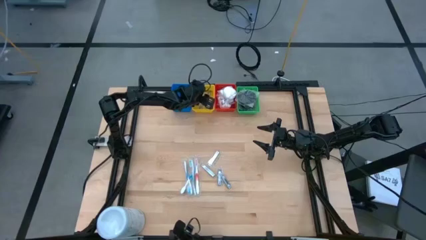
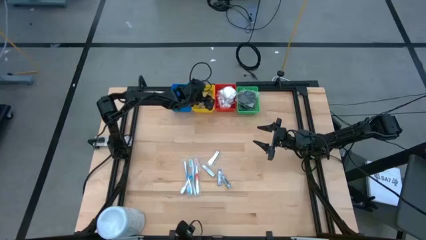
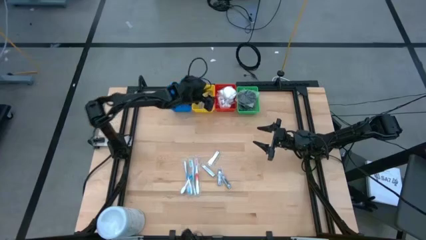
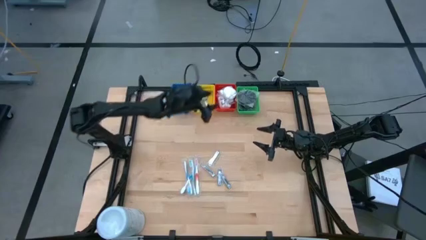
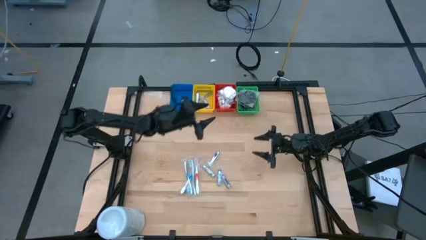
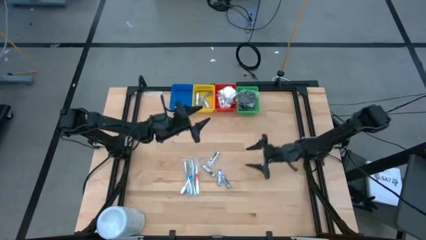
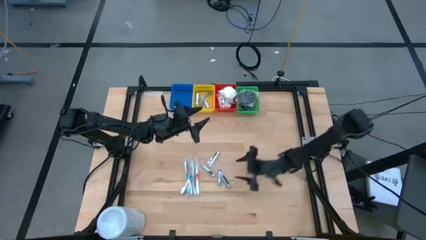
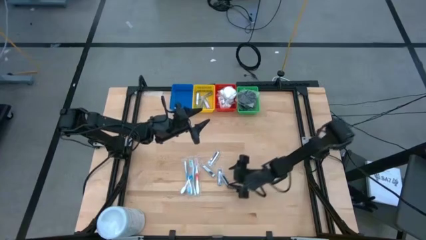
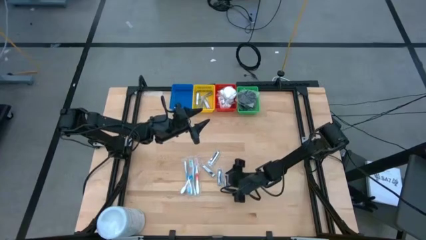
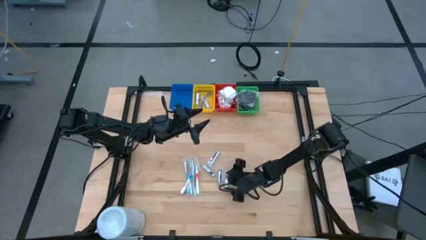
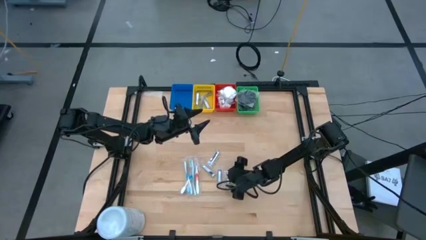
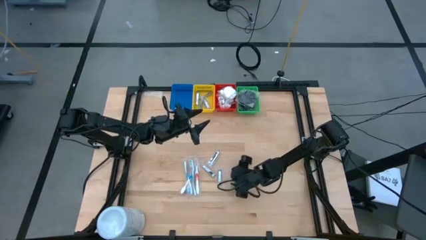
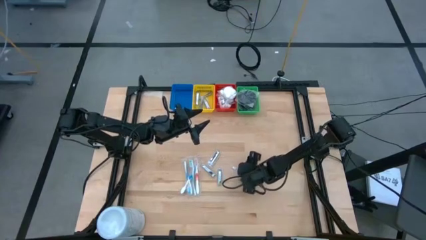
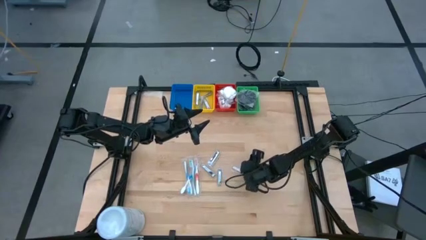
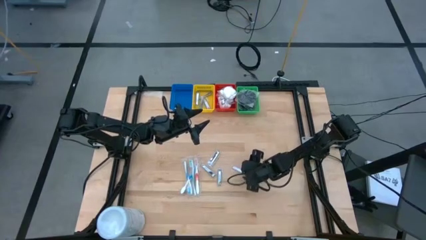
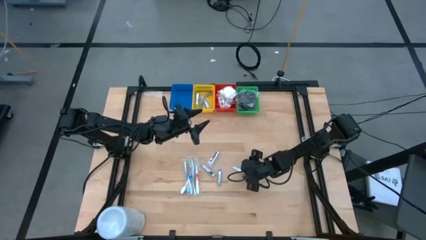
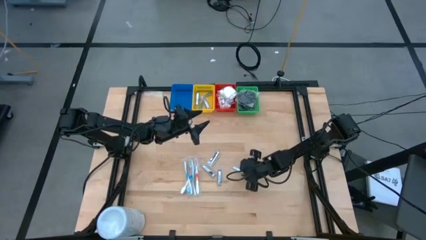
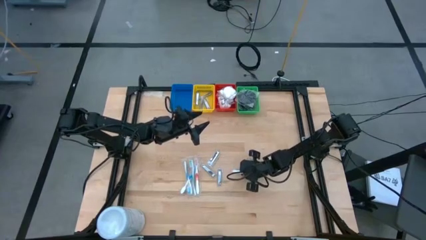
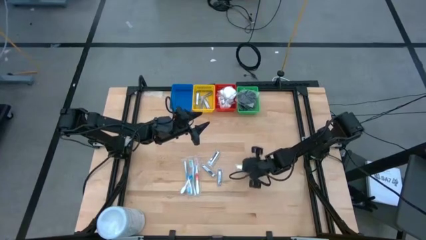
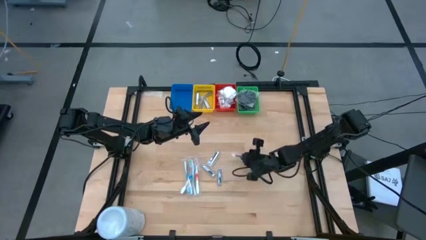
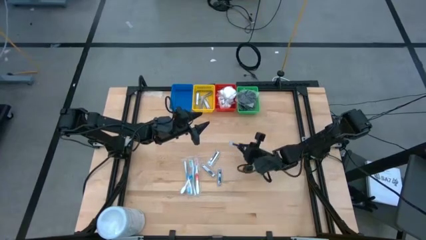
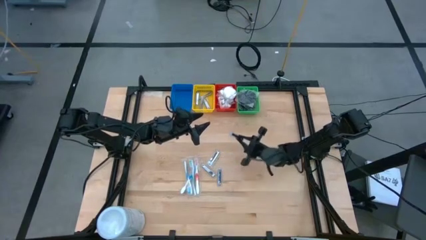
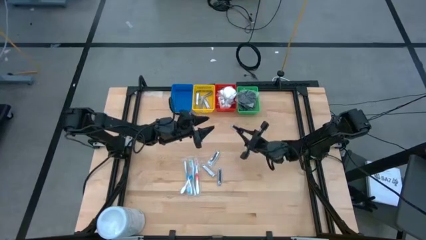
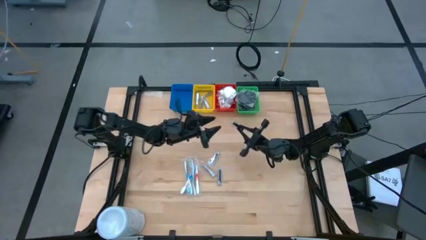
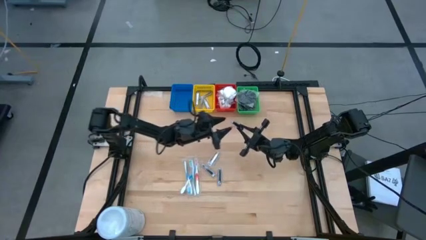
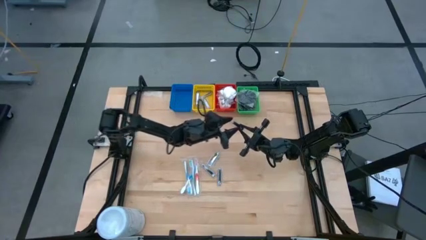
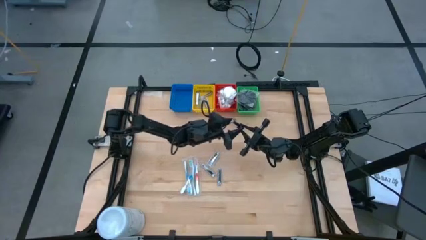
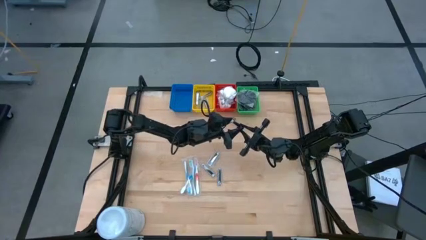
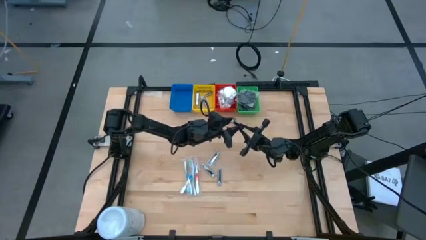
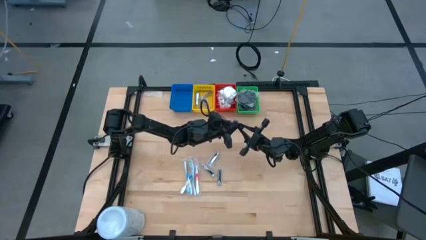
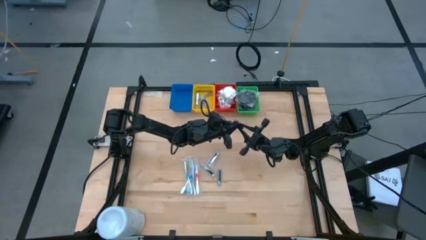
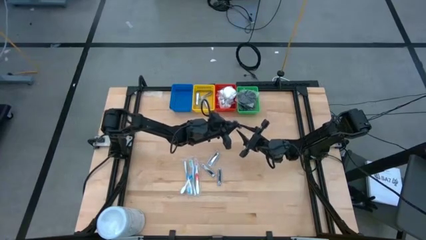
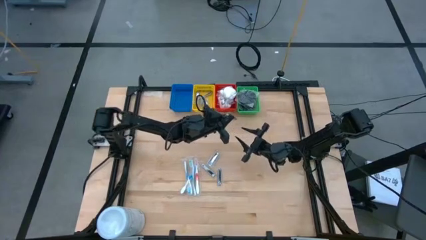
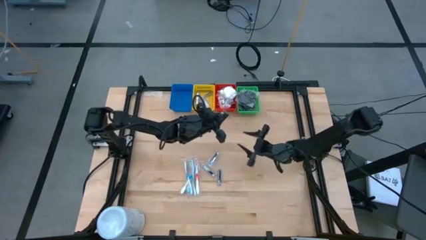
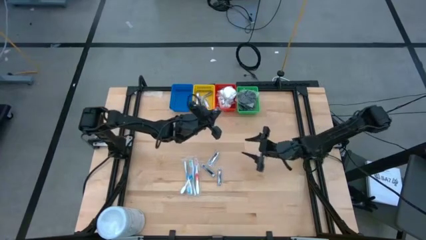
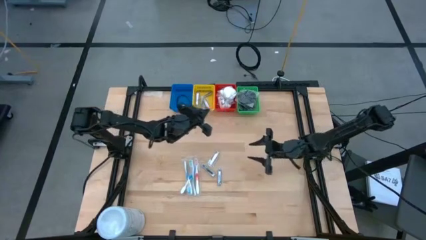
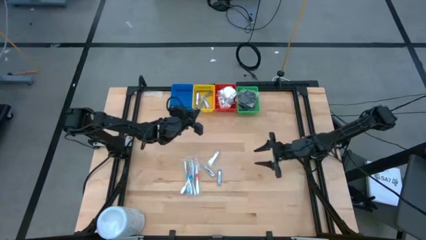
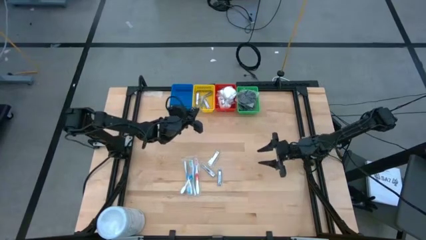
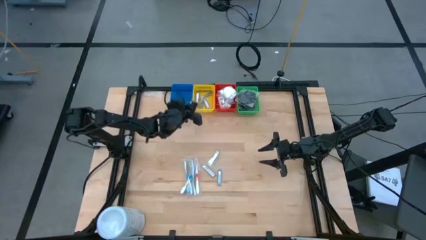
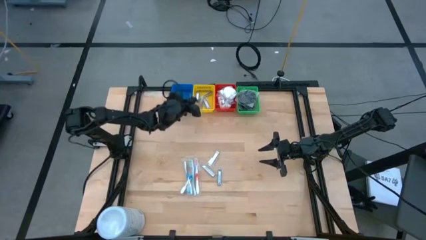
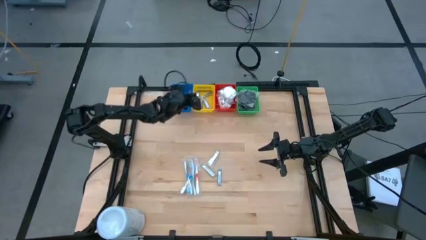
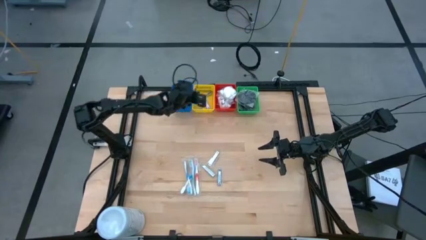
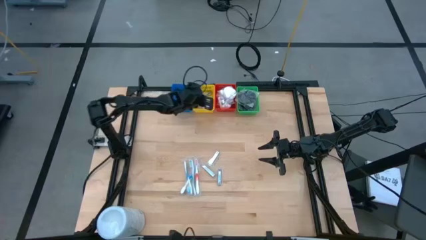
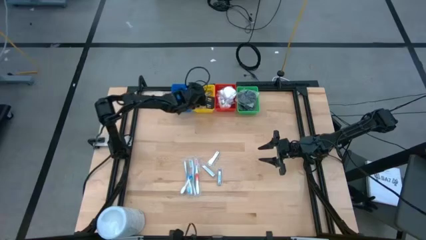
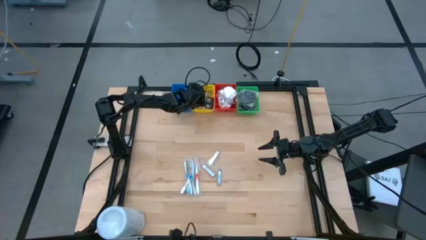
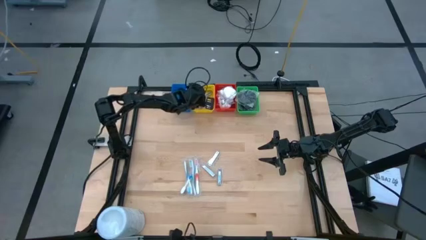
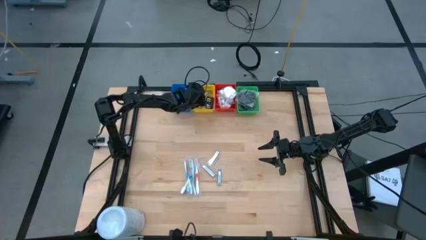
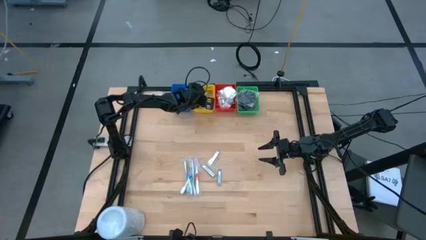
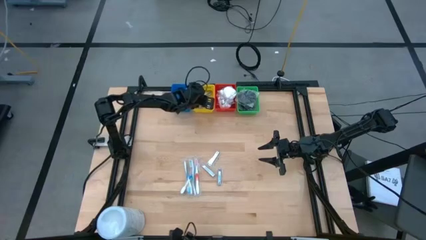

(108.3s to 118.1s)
Task: Pick & Place Travel size toiletries
Put the nail cutter into the yellow bin

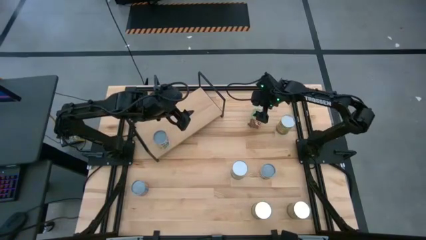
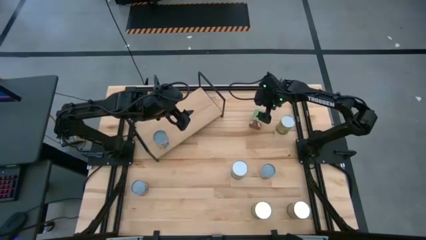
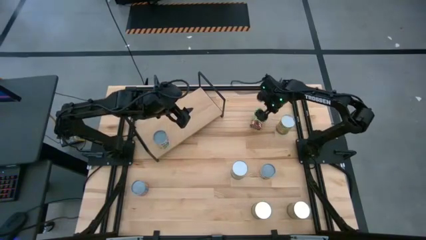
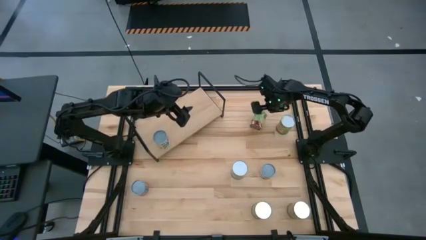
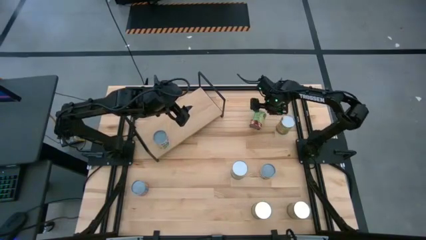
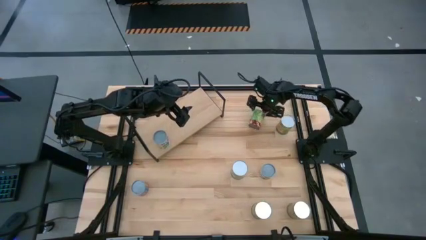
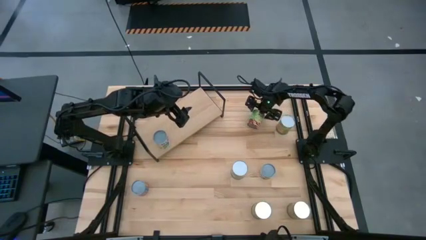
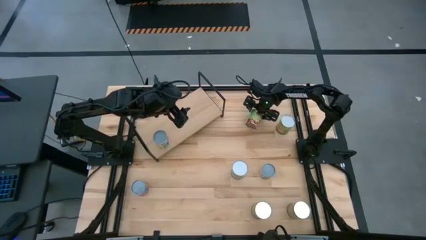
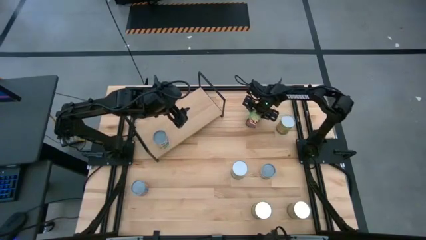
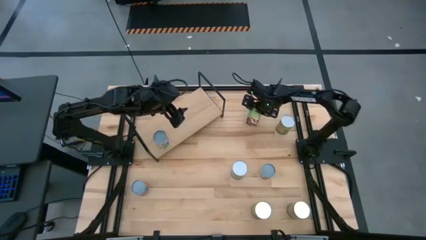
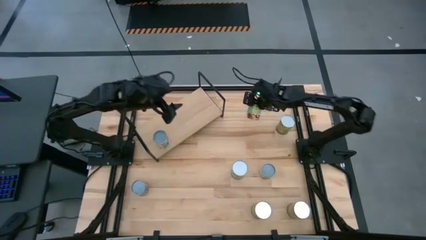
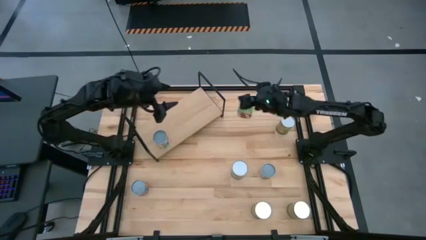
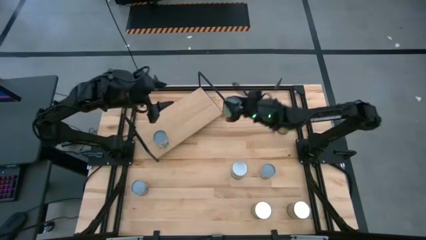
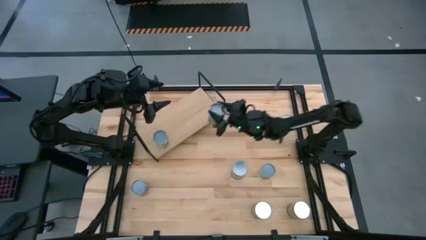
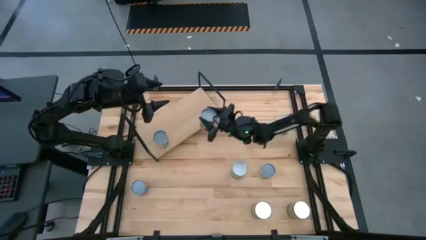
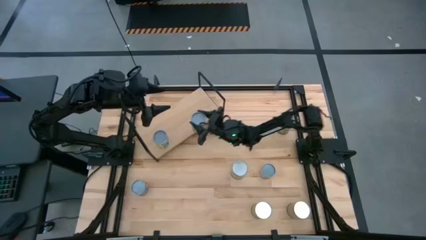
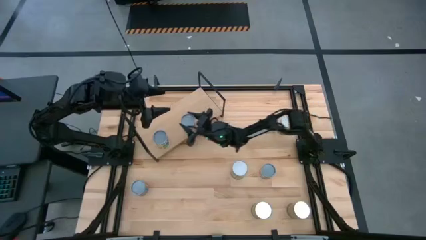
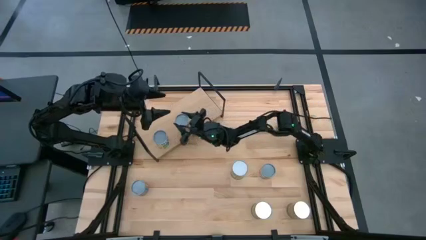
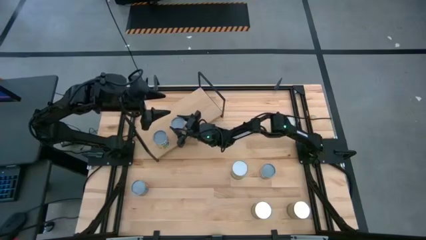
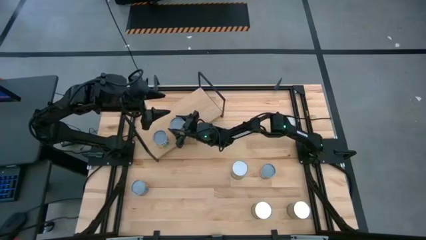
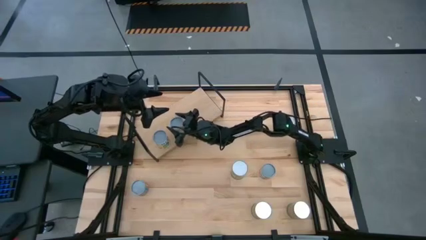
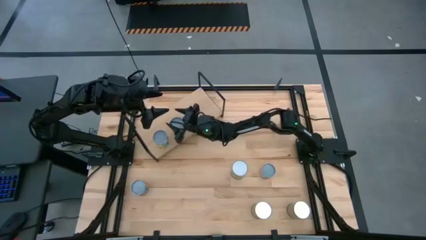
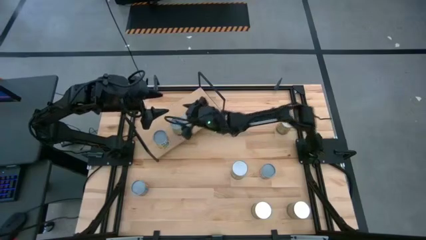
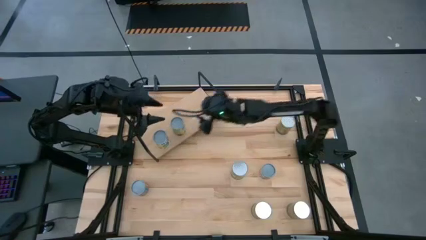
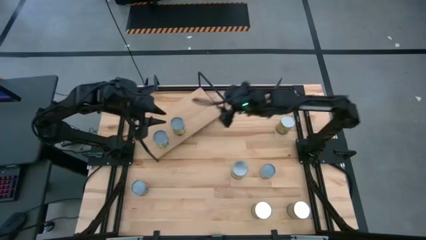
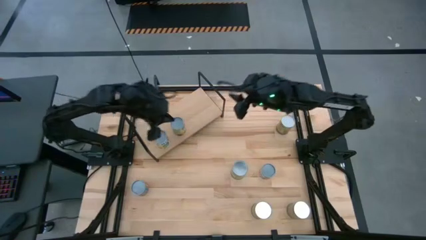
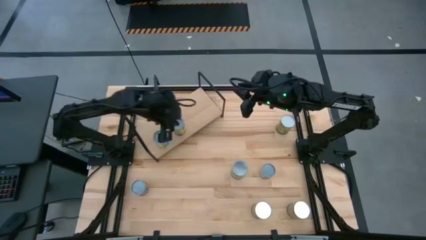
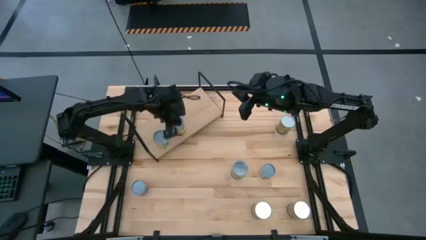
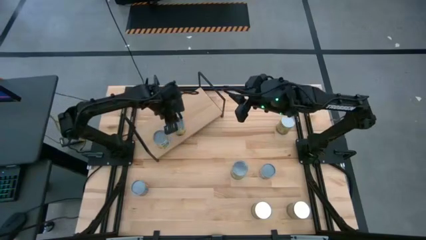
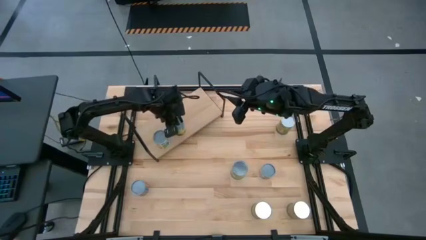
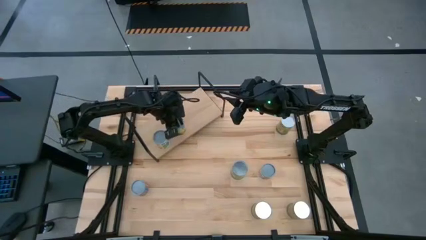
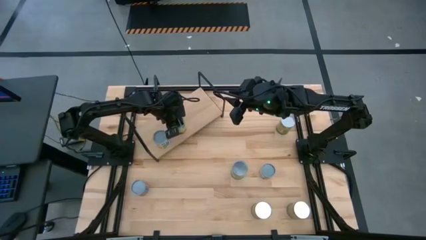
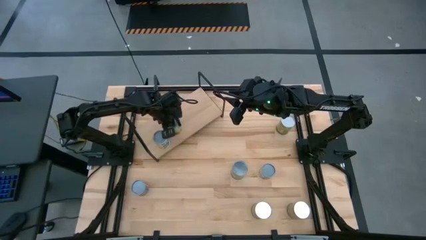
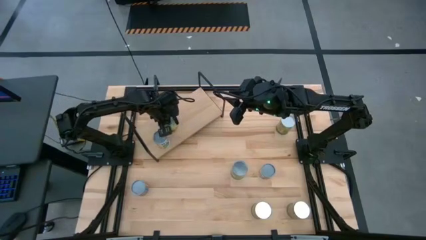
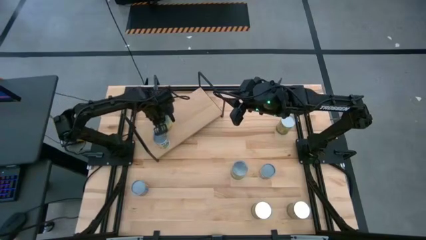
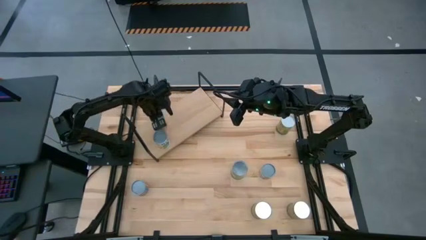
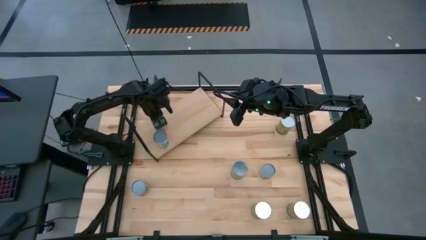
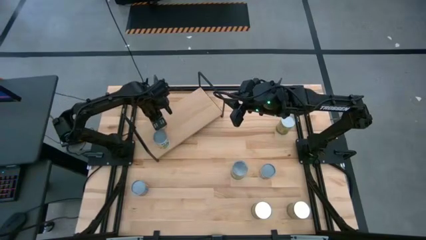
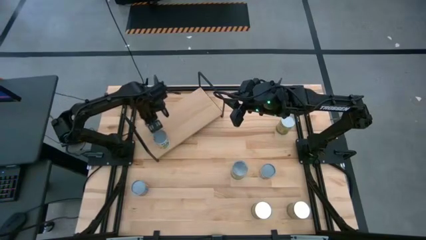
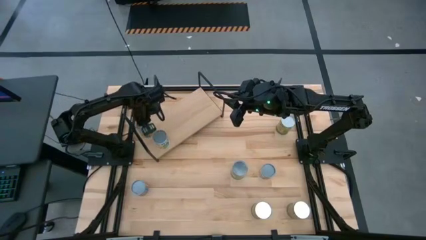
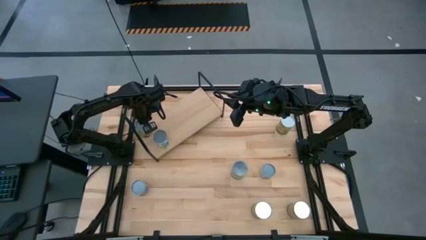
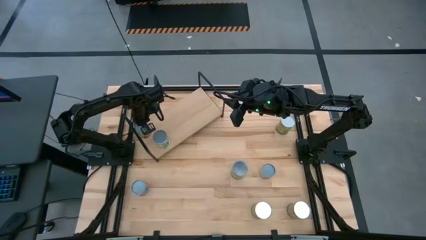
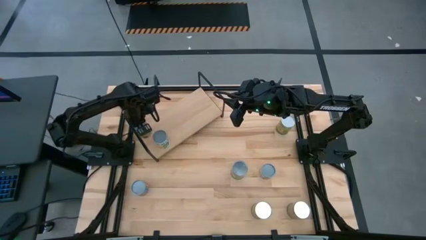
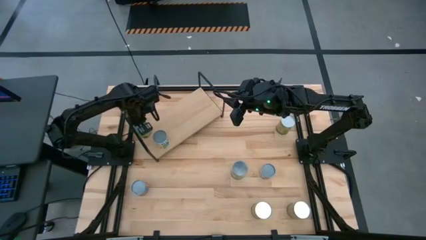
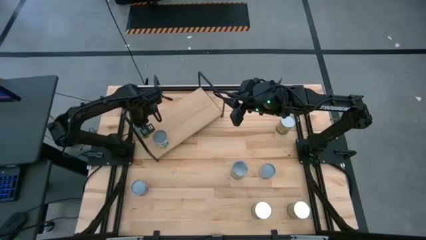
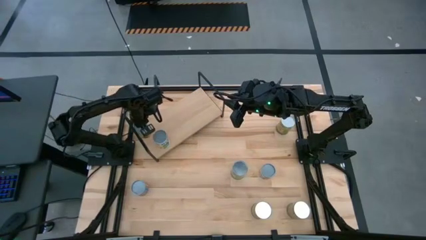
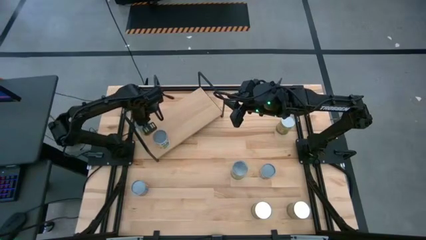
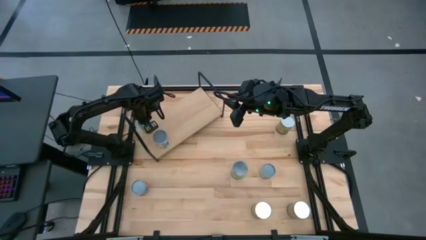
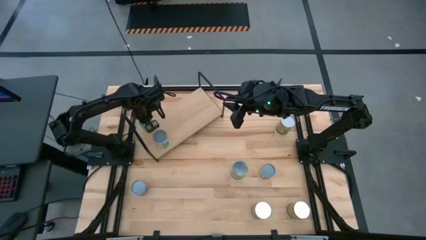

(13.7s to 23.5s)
Task: Pick and place cans onto a shelf
Put the canned spaghetti sauce on the shelf
